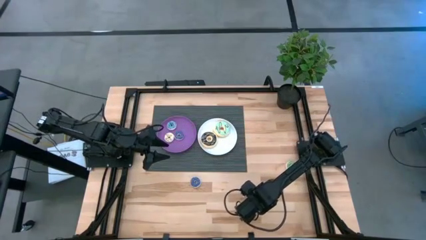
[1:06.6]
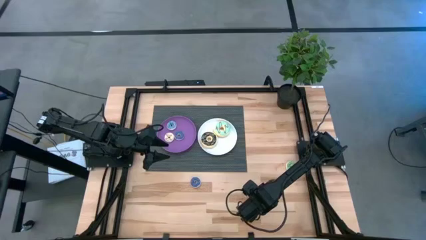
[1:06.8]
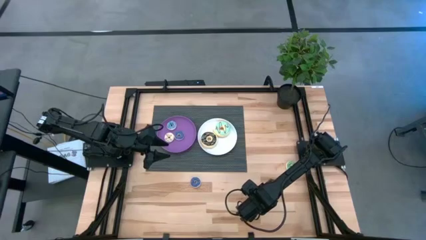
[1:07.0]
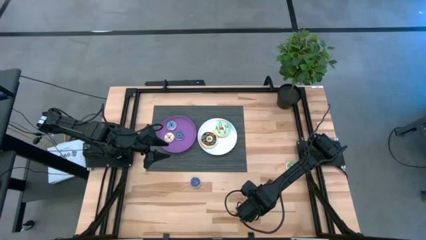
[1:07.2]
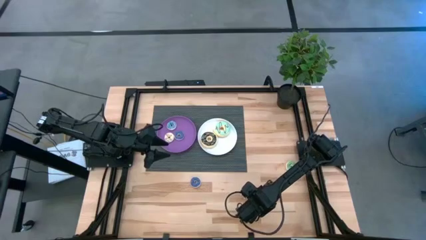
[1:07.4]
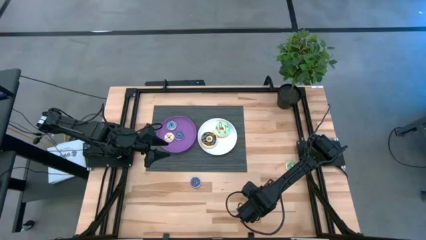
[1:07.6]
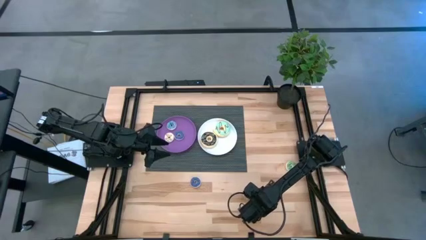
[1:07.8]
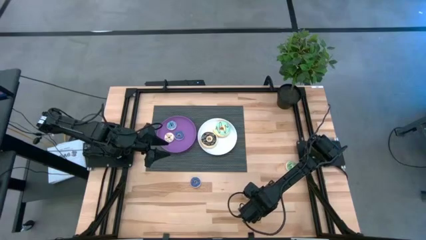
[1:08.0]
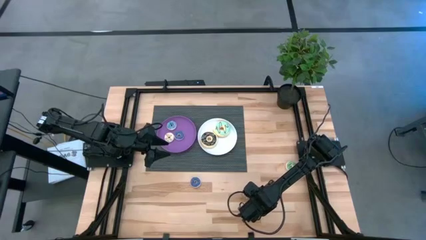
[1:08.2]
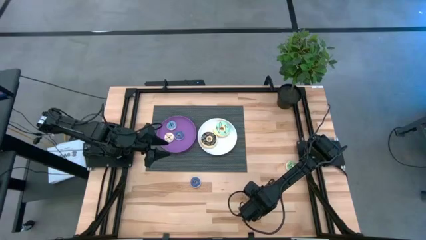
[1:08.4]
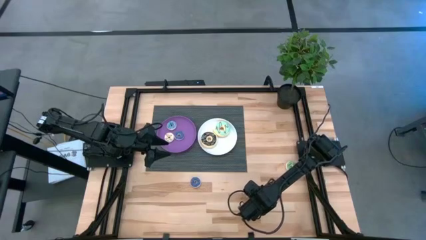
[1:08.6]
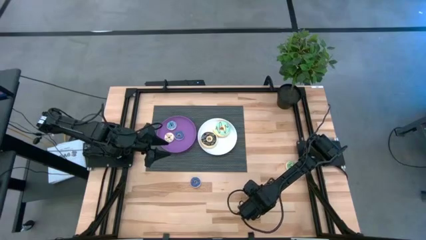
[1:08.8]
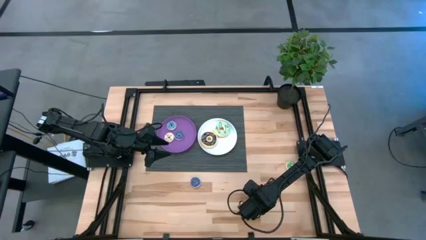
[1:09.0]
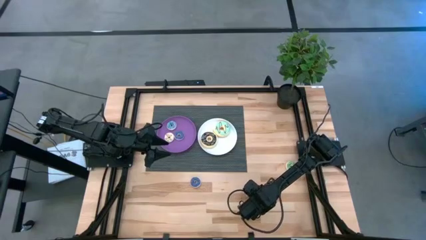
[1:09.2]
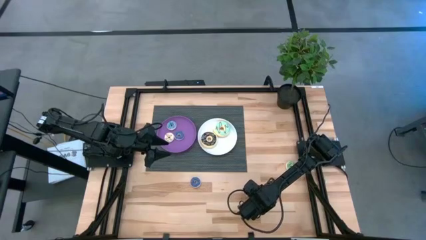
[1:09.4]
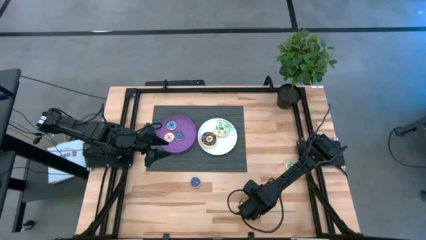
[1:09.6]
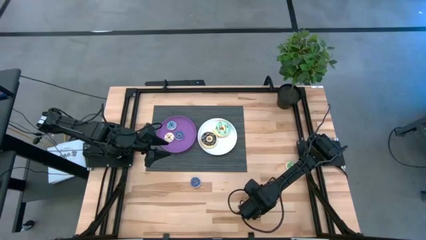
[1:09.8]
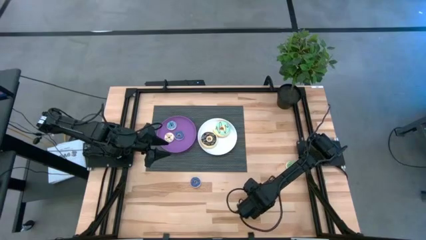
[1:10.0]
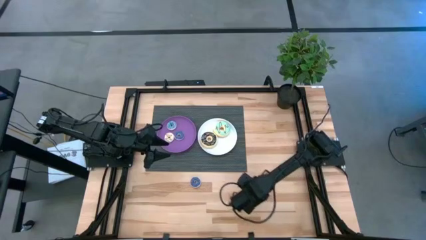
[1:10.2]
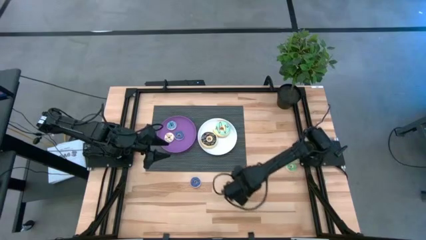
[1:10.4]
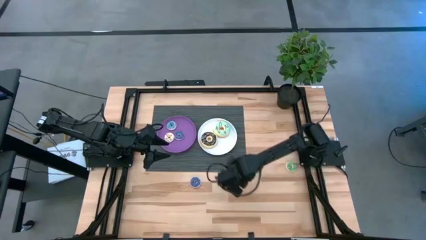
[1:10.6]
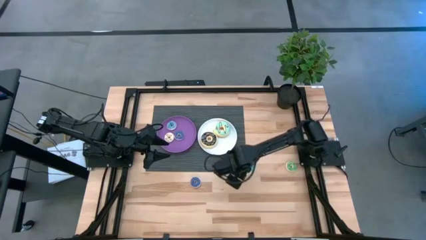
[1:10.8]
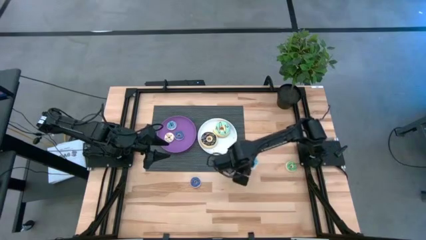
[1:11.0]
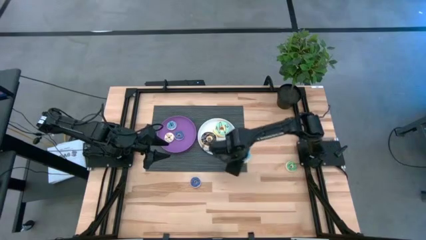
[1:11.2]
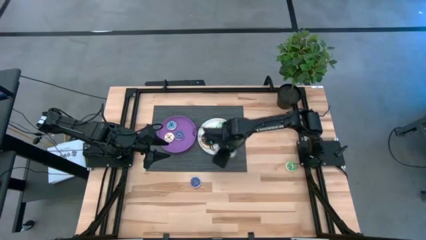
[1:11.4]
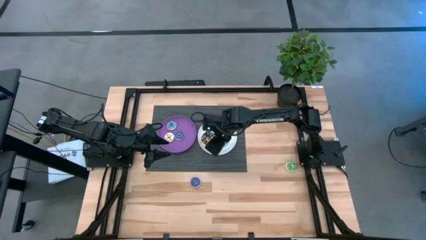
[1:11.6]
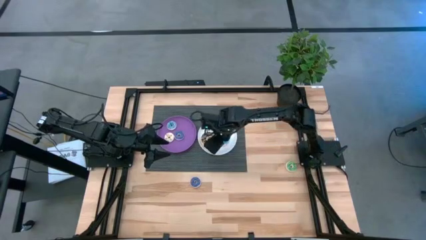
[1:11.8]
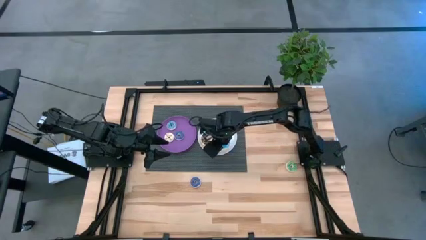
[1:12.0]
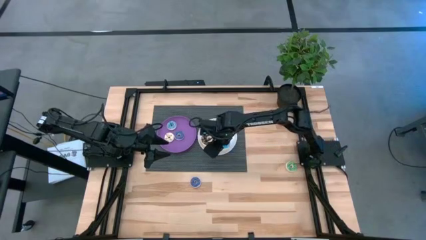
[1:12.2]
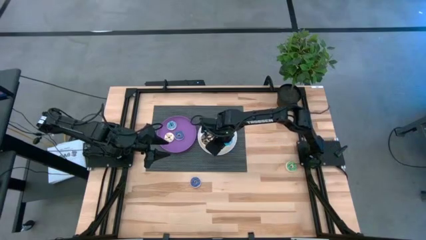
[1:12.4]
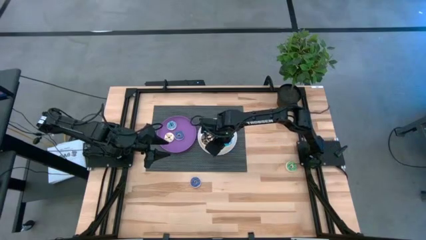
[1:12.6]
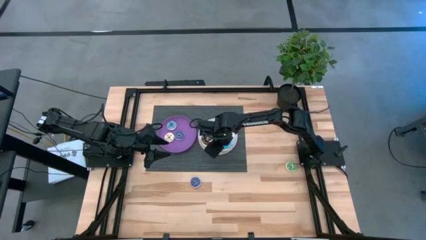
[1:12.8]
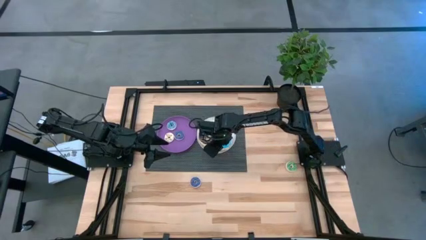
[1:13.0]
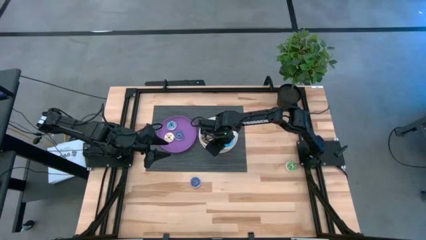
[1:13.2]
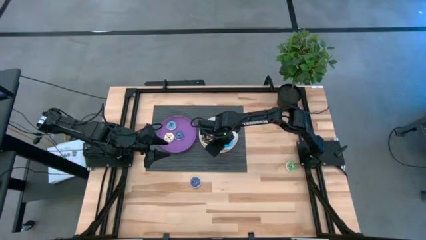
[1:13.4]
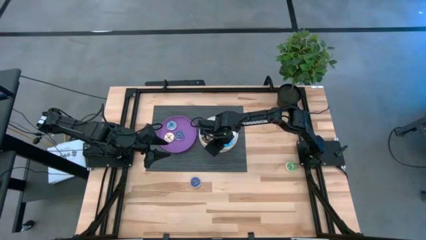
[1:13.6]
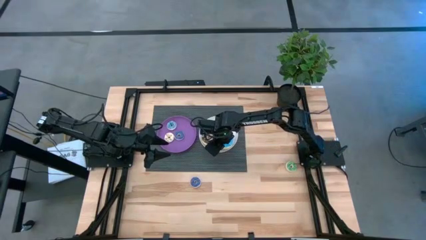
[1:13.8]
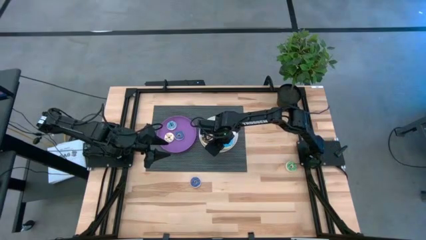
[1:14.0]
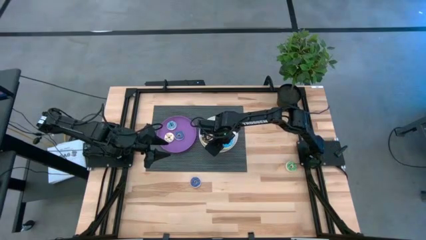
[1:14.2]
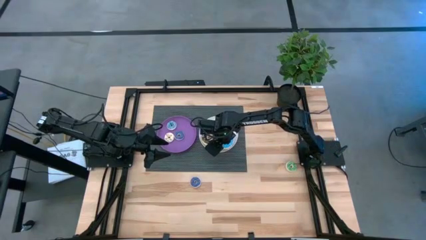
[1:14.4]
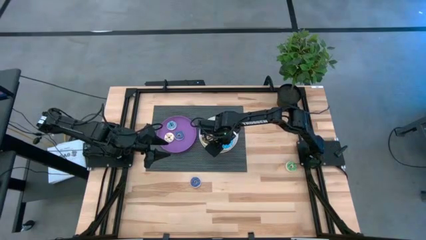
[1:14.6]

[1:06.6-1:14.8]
Task: Pick & Place donuts
Put the large blue donut on the white plate

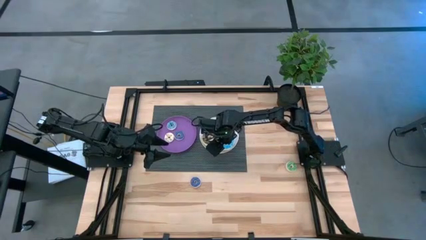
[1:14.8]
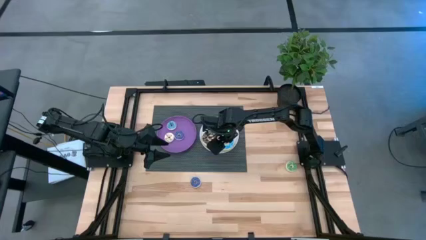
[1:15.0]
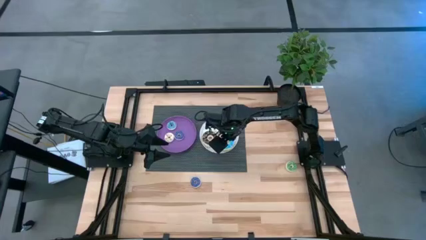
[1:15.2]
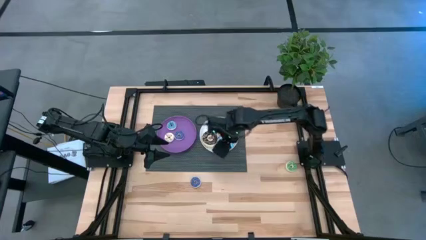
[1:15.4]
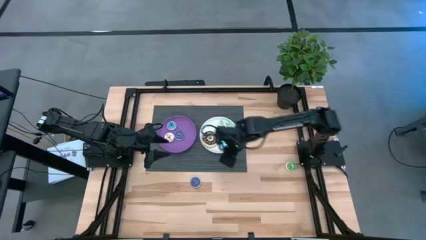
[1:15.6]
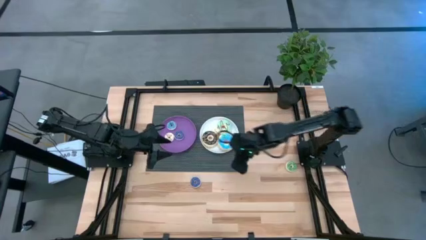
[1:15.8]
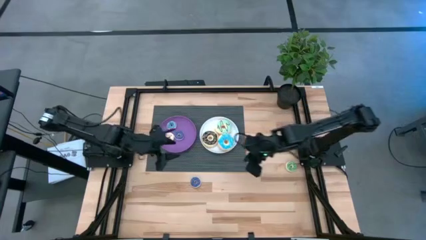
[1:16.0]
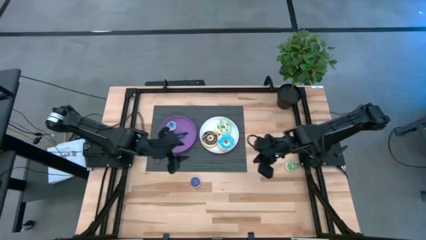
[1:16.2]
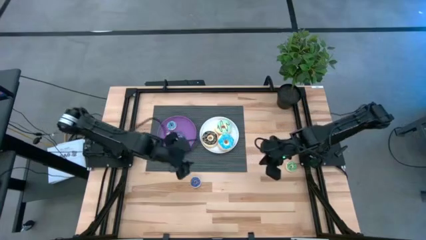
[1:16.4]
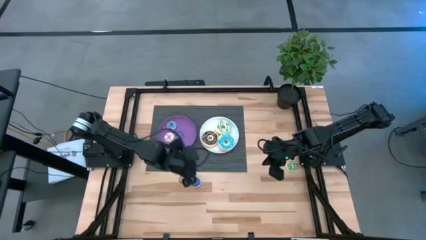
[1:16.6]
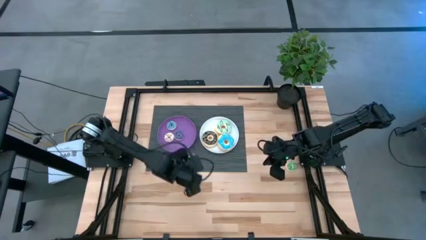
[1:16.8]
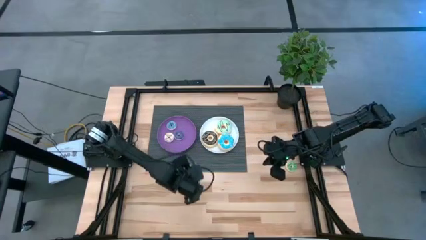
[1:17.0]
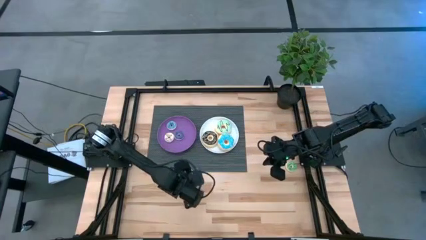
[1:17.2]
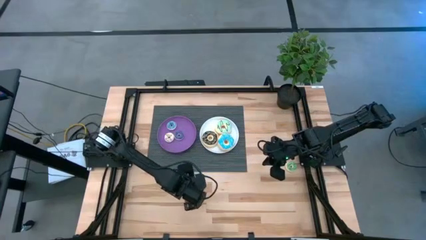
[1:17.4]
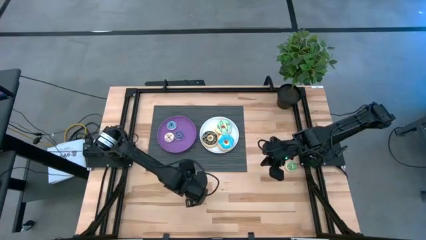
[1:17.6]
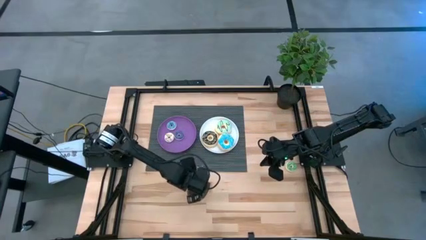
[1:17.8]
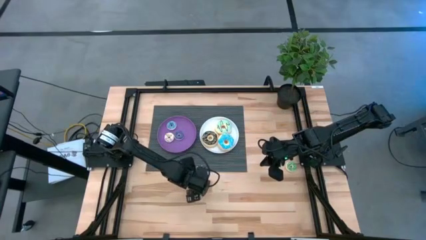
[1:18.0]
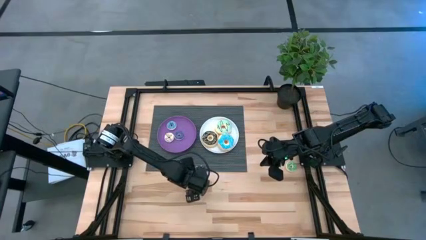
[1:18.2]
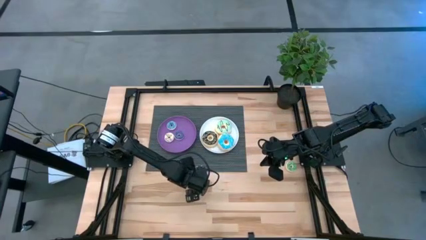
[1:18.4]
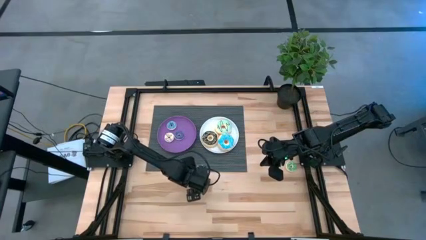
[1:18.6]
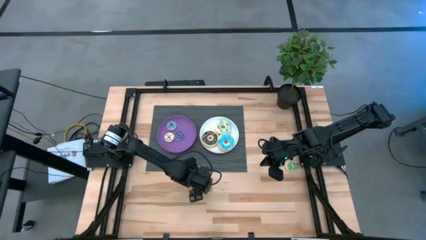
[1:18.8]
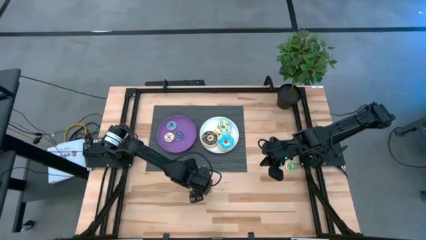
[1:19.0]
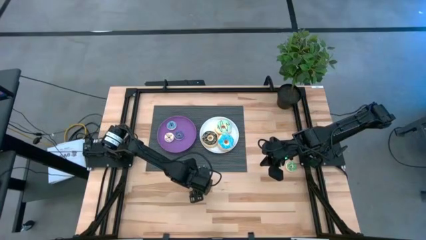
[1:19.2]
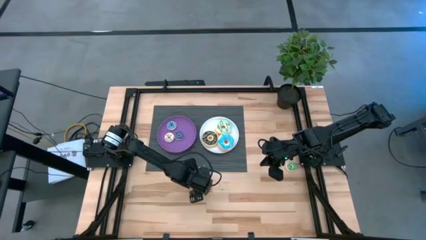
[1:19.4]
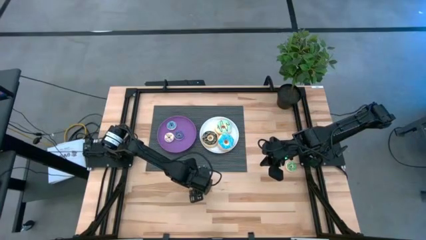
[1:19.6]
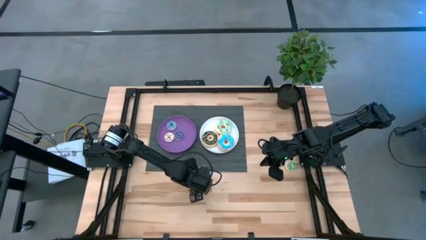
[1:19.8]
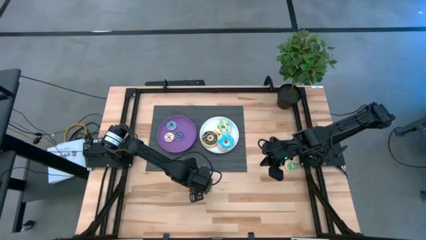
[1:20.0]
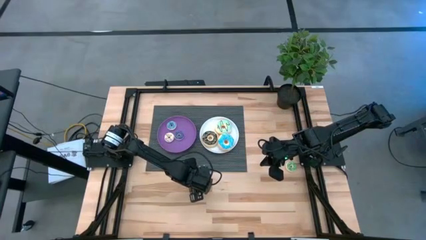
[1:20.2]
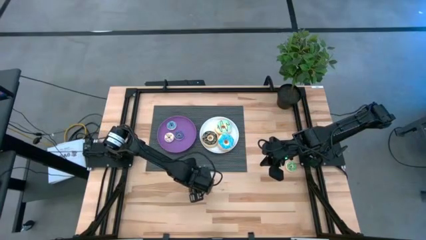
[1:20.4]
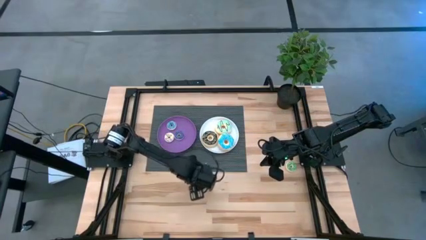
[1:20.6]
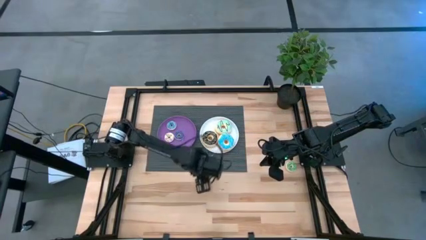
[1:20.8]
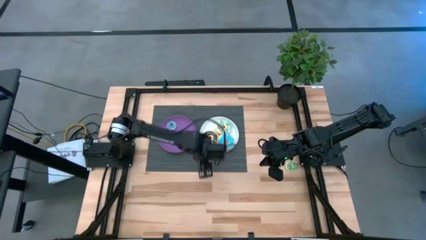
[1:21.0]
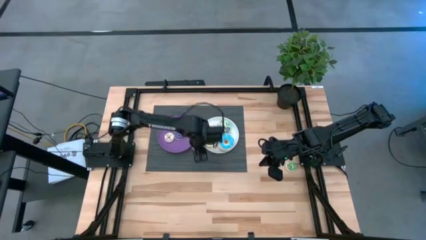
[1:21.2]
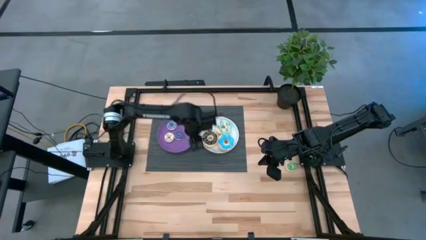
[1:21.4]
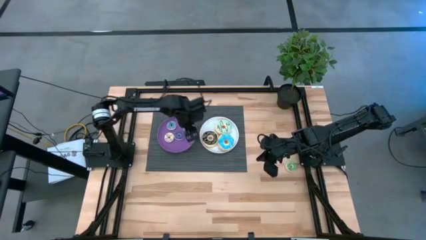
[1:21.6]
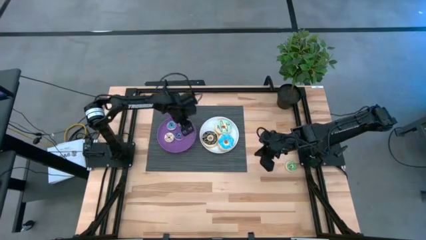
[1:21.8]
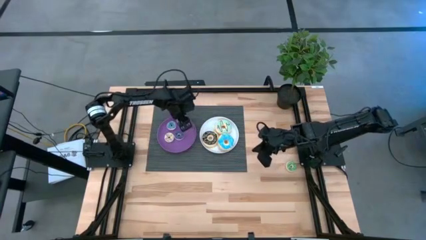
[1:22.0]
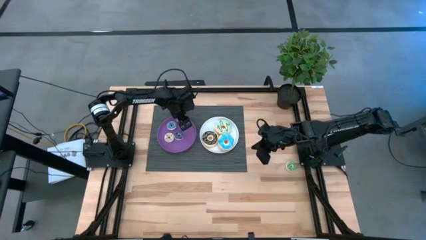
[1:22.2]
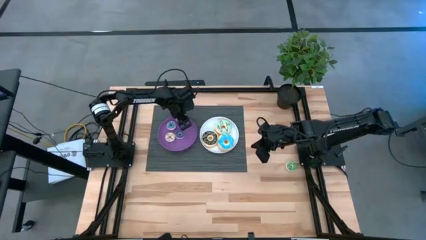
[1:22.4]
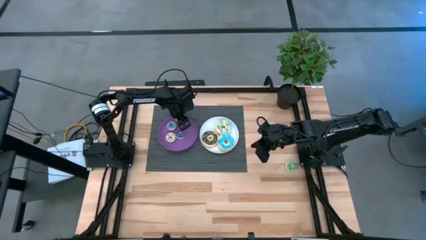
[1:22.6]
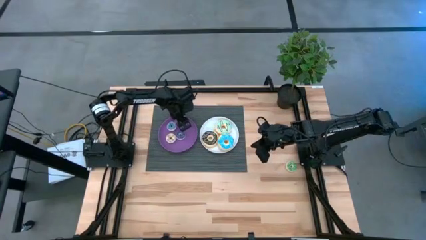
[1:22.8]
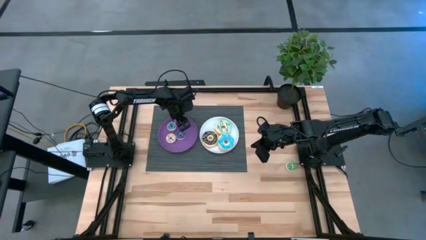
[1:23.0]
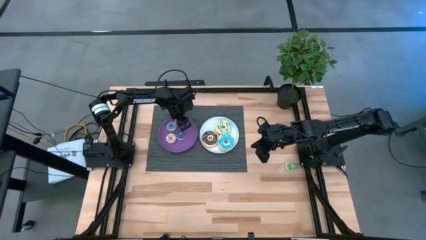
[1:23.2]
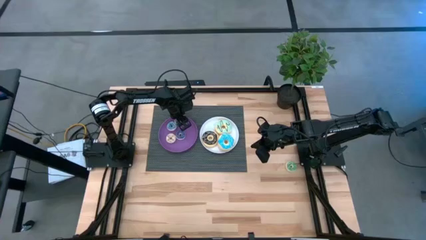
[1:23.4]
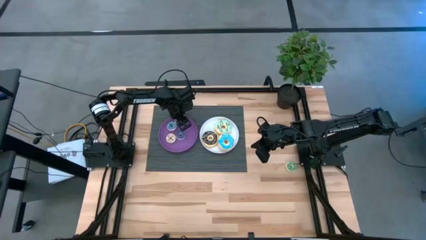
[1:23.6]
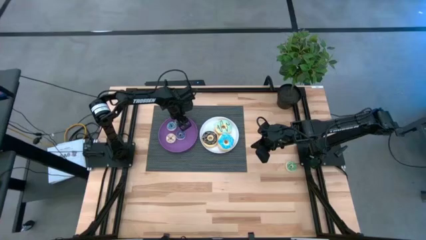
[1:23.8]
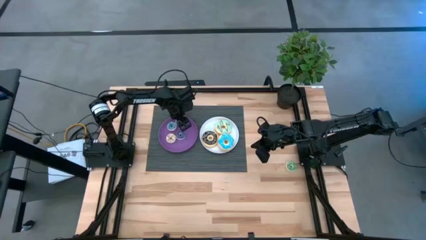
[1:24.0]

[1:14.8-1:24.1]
Put the small dark blue donut on the purple plate
